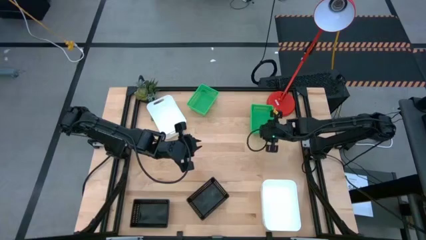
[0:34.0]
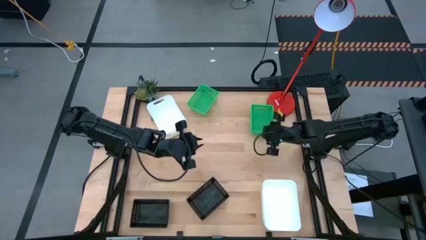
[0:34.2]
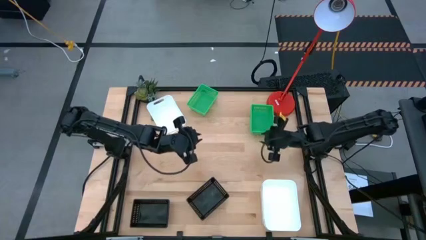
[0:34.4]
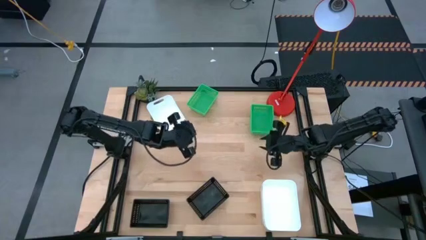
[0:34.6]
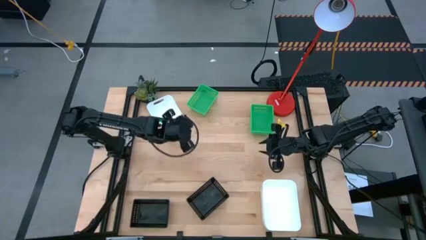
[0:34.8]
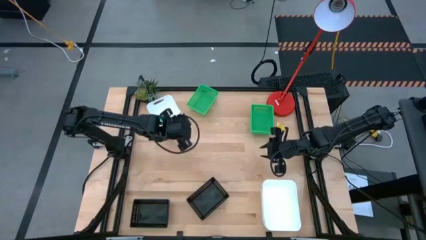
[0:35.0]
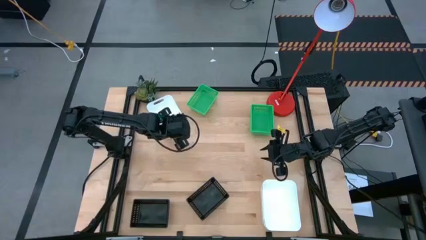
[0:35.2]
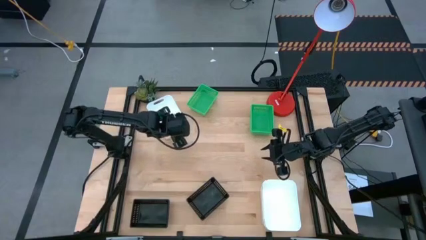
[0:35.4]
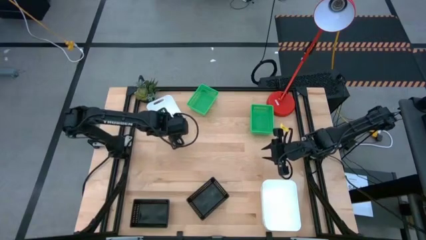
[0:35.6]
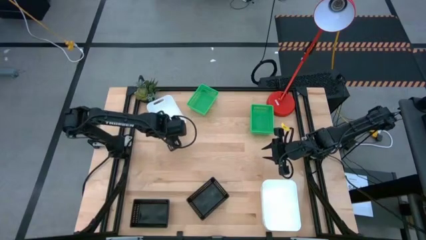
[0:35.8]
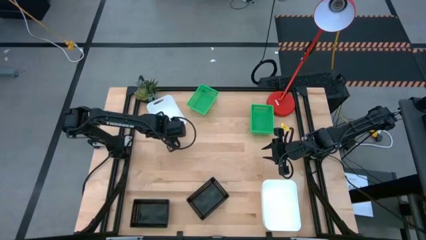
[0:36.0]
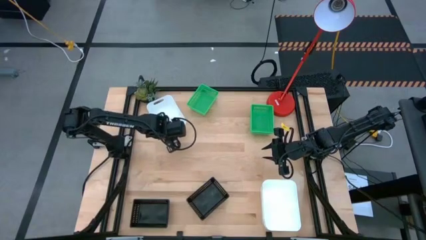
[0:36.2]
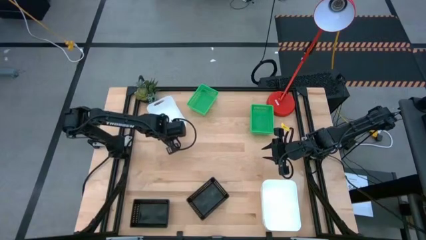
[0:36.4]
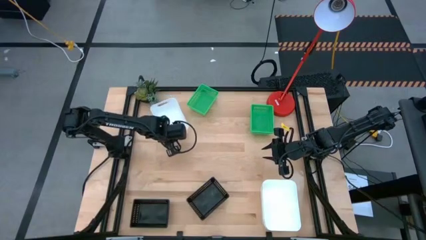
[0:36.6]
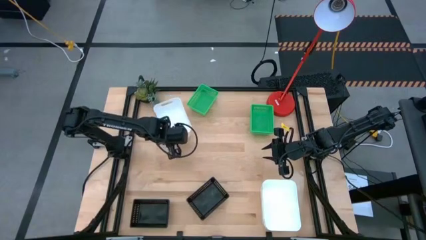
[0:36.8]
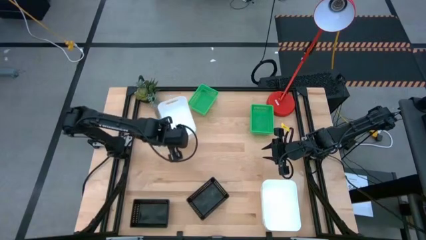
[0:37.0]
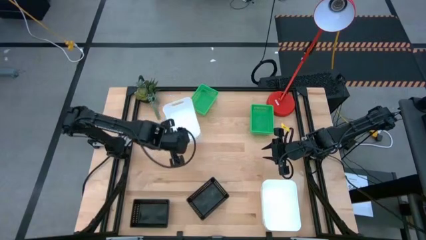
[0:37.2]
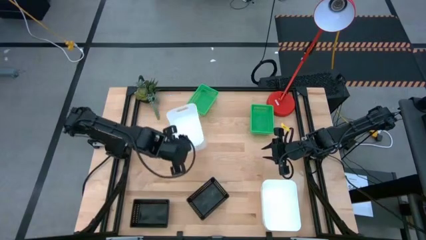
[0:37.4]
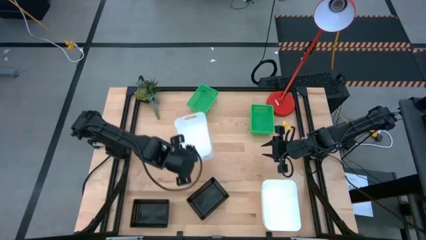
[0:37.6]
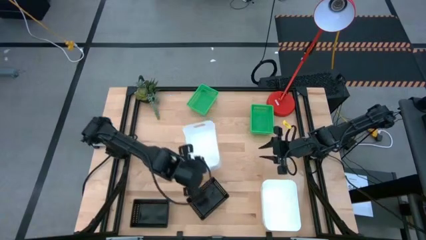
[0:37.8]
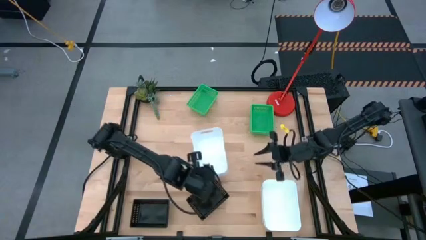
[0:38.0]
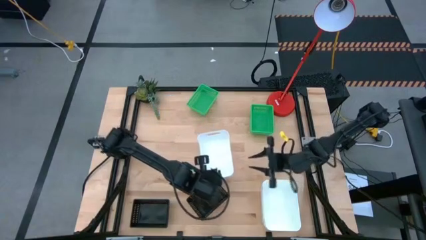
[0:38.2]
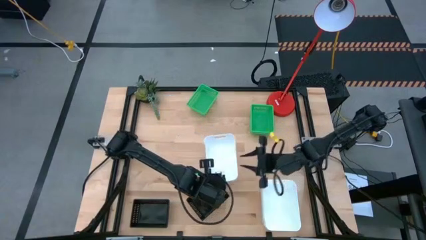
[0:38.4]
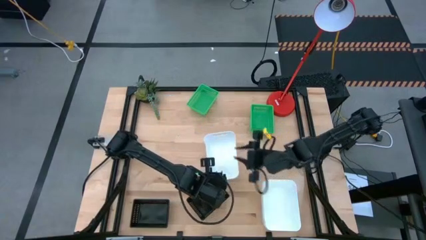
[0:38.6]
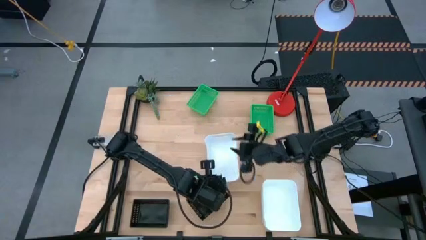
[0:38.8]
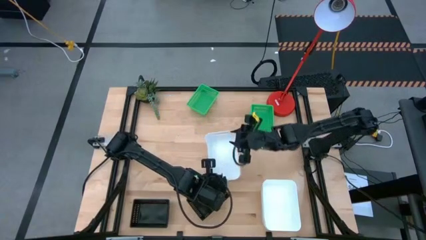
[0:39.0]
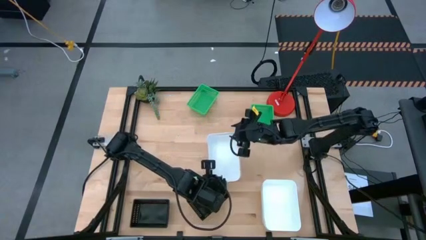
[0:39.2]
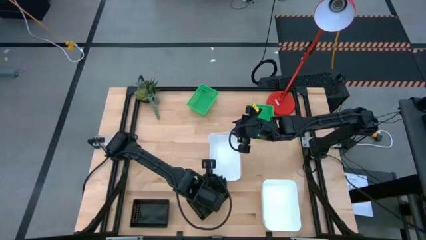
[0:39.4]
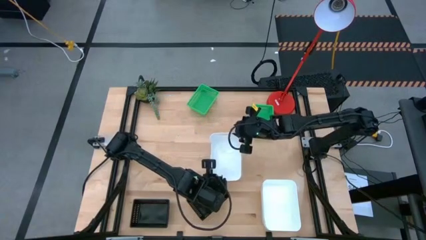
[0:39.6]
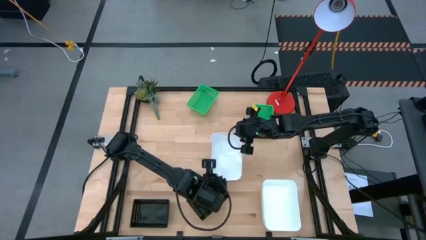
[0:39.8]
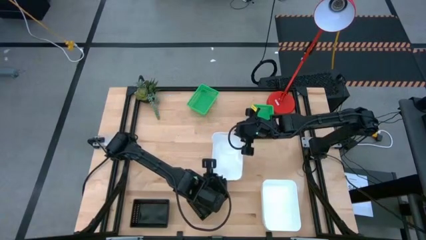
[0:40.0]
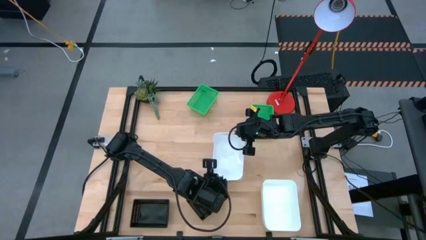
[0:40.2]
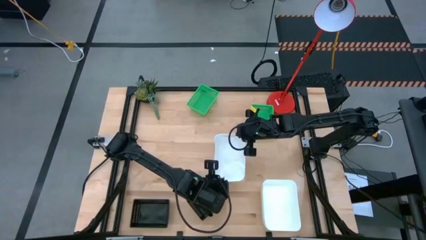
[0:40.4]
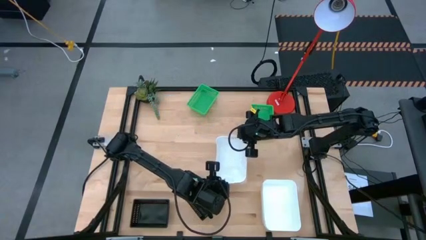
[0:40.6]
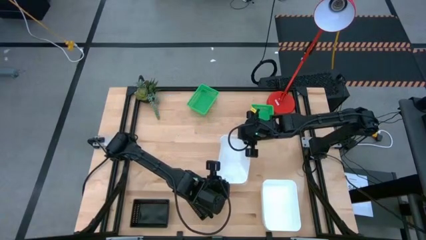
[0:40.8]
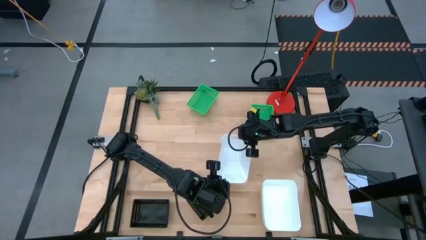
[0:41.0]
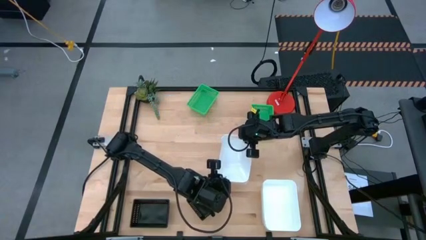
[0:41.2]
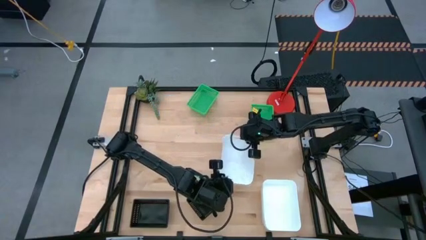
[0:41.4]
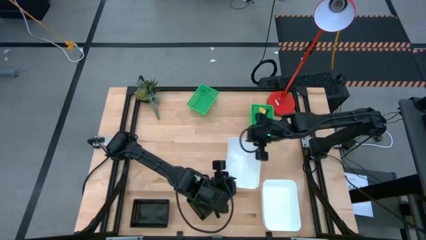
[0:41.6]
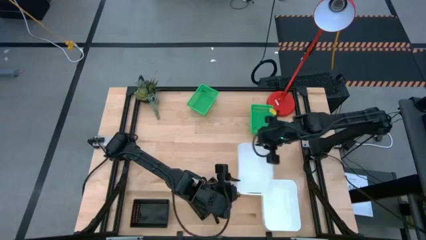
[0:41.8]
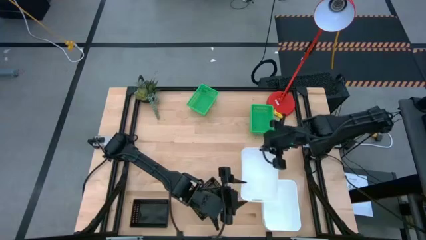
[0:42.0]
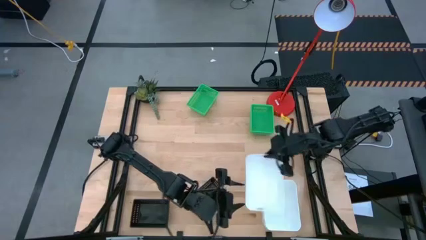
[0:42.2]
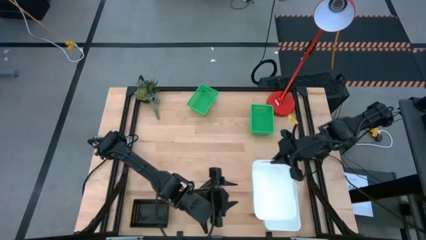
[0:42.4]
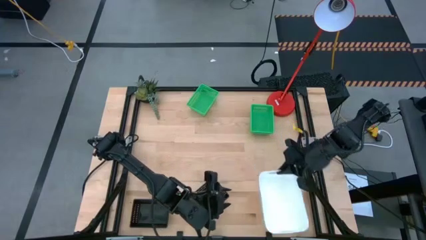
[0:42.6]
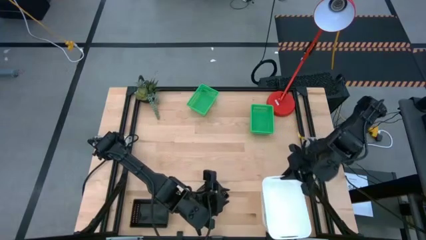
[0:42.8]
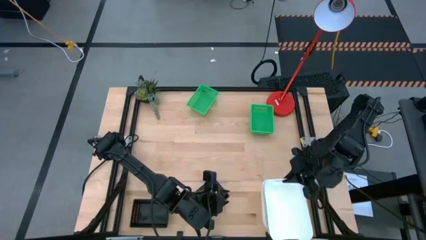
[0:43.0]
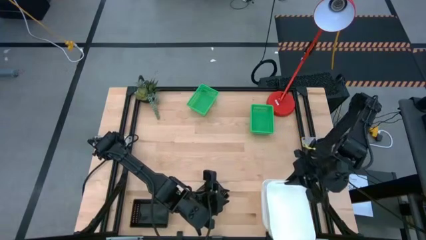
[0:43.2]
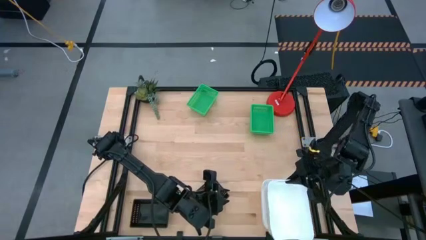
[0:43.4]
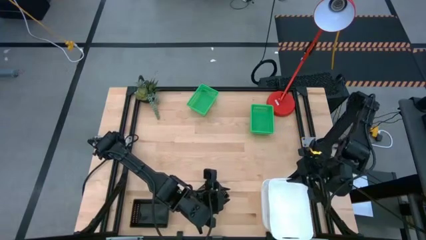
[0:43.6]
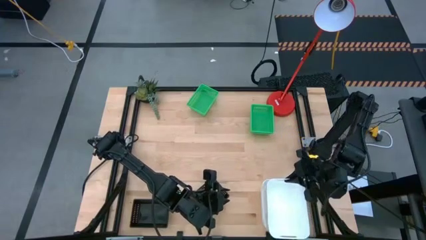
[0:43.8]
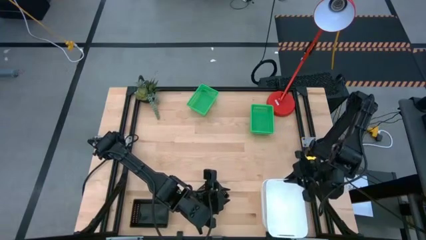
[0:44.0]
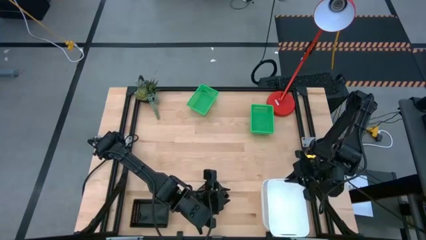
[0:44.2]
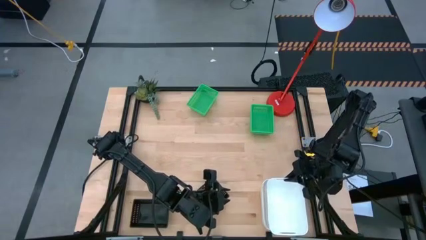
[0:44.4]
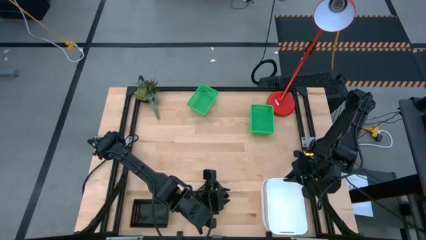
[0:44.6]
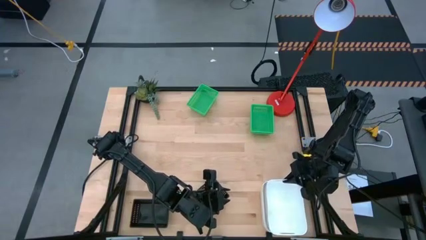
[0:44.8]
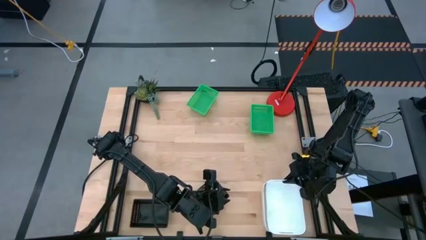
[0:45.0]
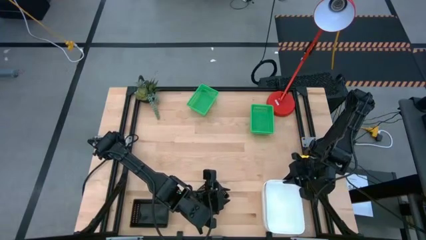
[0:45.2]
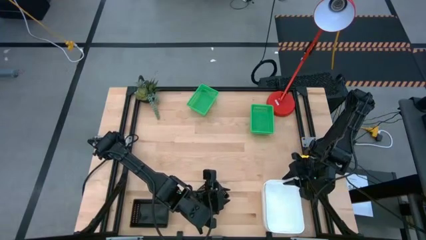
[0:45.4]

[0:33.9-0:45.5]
Stack the top white bin on top of the bottom white bins

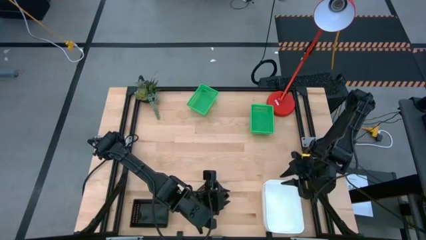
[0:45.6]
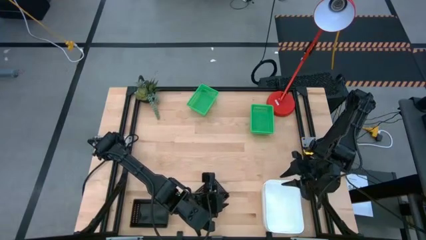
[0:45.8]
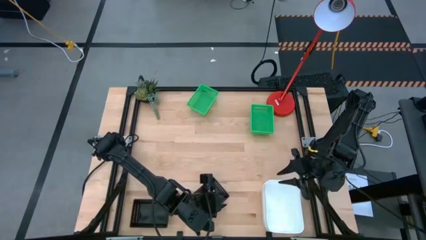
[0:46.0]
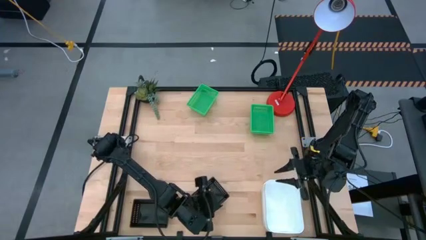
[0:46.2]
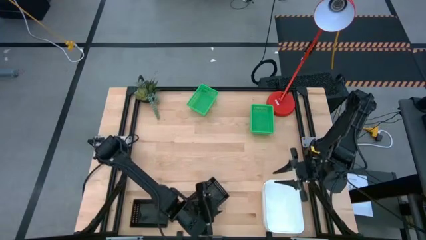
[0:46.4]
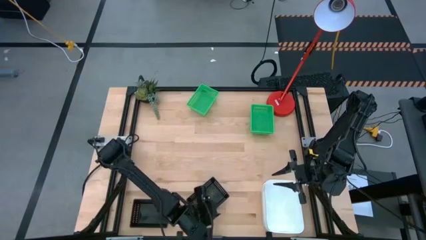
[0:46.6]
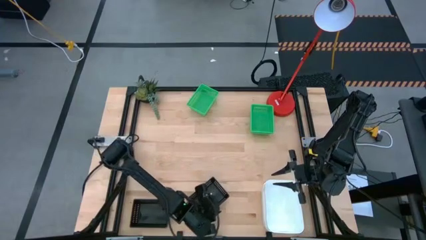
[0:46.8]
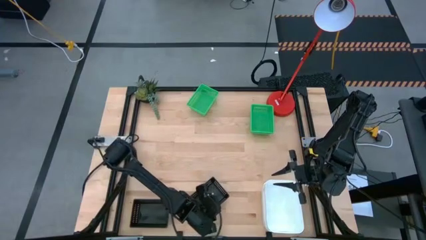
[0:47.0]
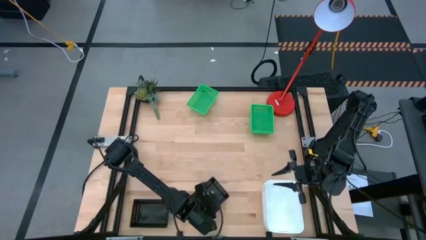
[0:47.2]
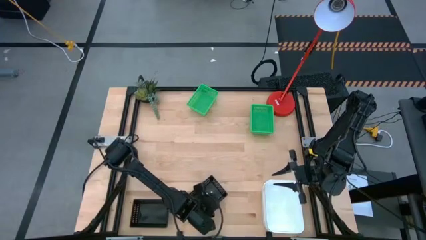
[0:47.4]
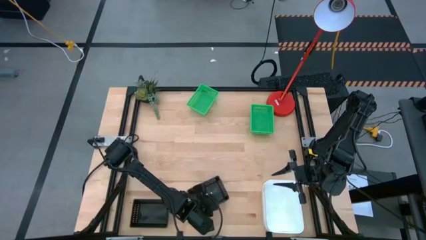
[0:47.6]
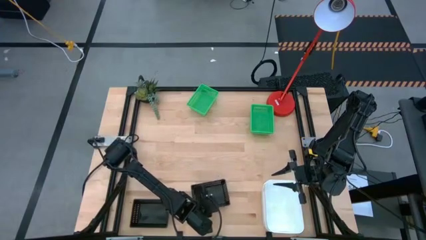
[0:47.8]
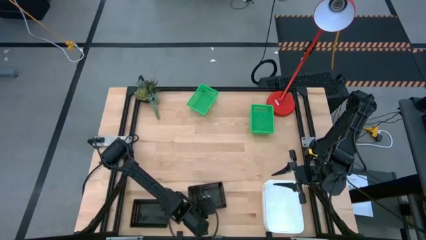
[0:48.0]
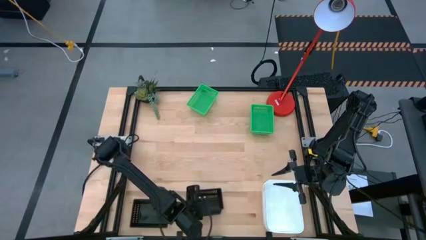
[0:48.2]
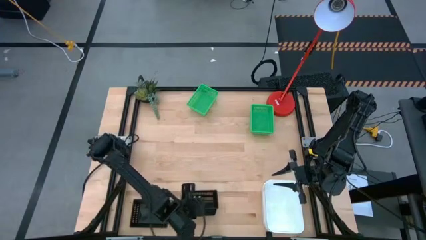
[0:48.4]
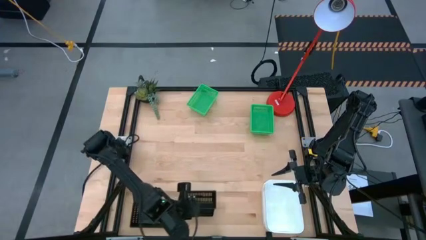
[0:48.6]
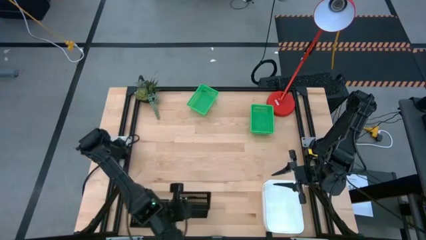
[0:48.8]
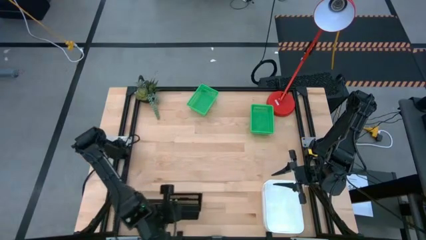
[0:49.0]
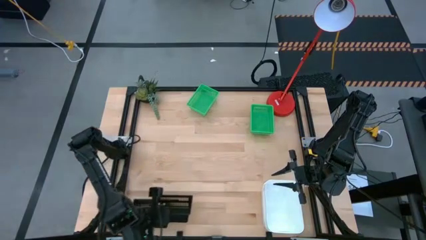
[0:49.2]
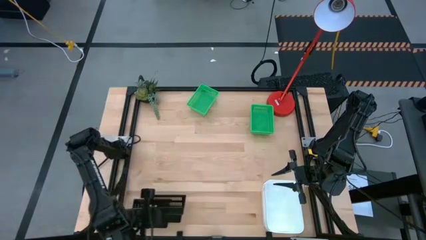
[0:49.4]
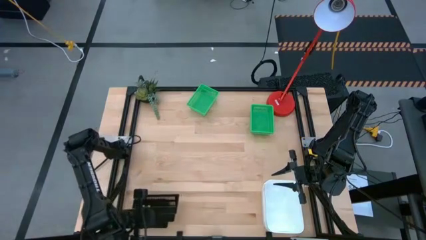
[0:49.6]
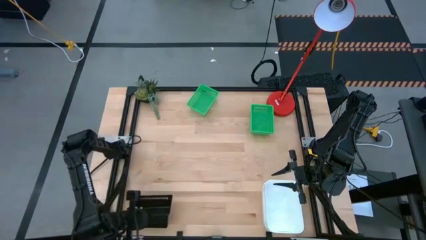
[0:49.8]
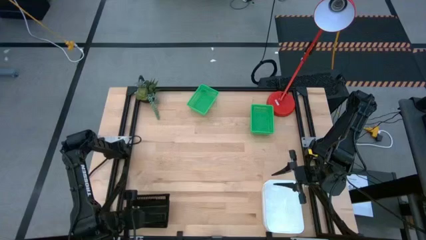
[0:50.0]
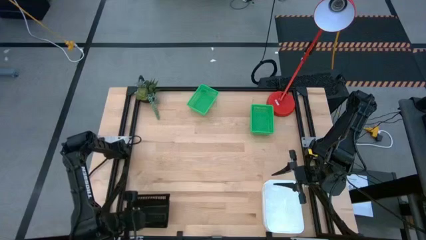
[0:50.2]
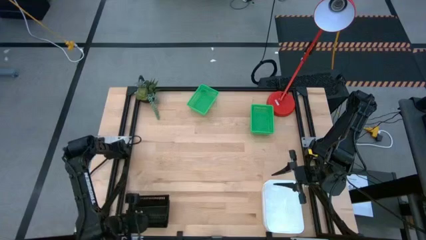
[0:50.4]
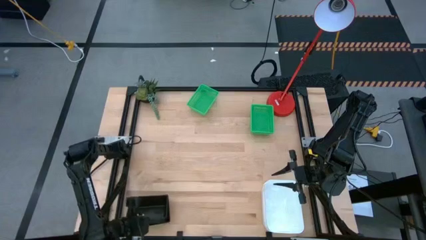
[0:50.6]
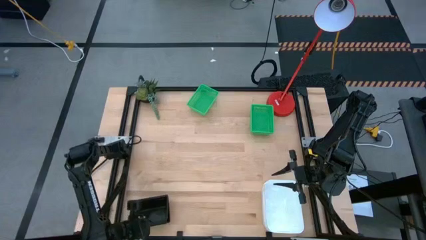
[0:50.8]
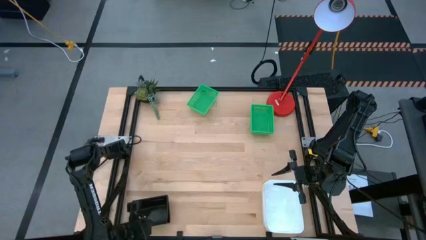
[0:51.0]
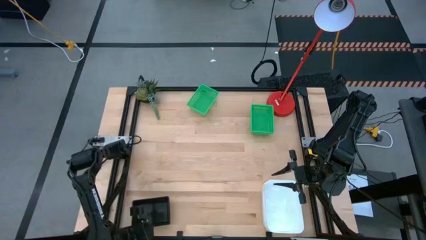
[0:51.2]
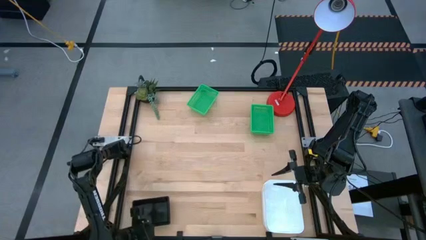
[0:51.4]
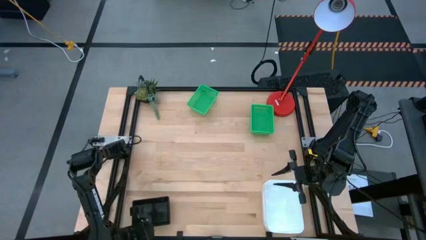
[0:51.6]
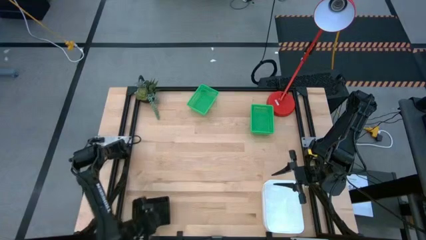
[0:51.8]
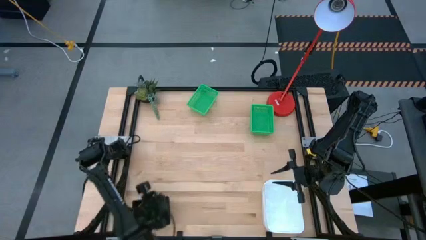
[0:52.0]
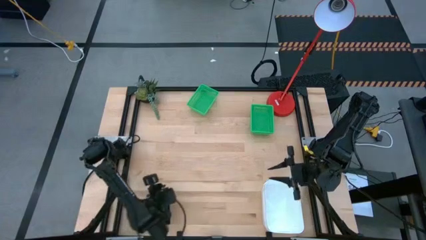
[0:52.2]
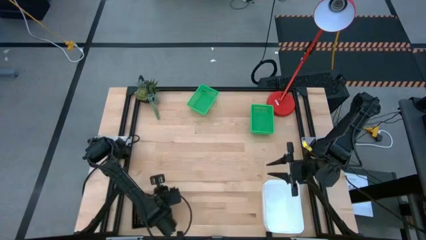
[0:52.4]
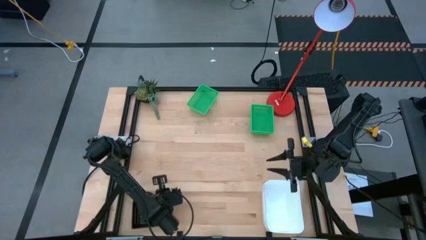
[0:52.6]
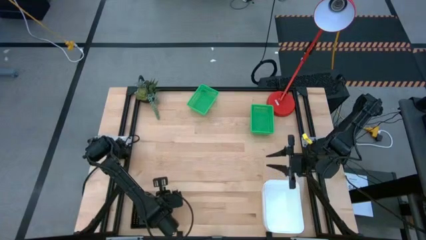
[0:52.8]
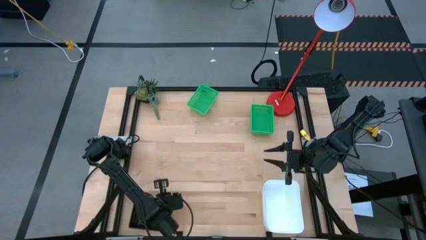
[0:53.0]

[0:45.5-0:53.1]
Stack the right black bin on top of the left black bins
